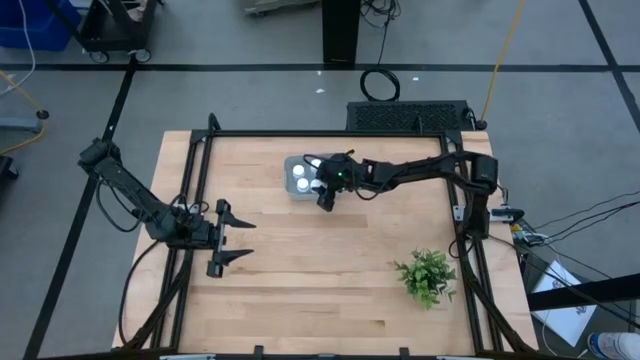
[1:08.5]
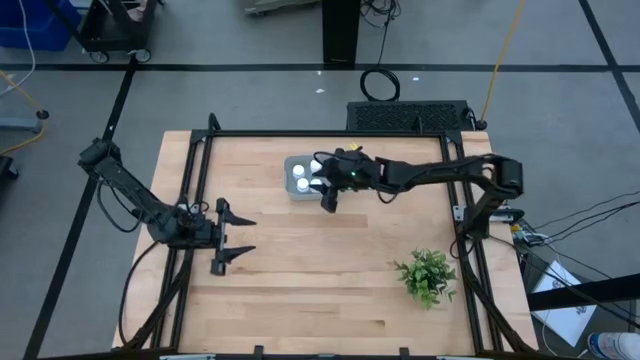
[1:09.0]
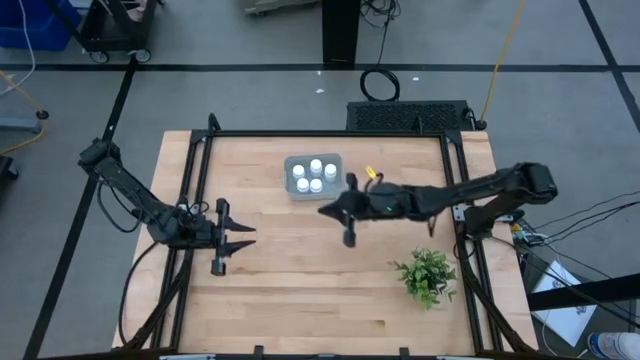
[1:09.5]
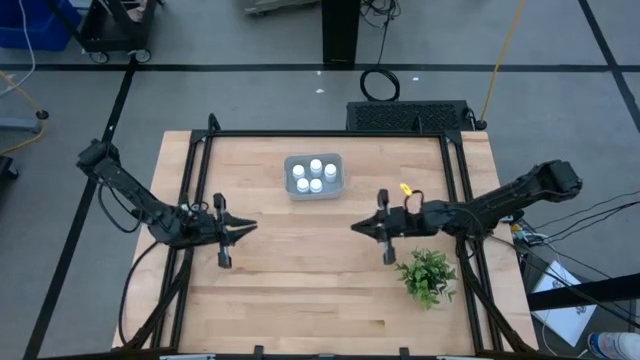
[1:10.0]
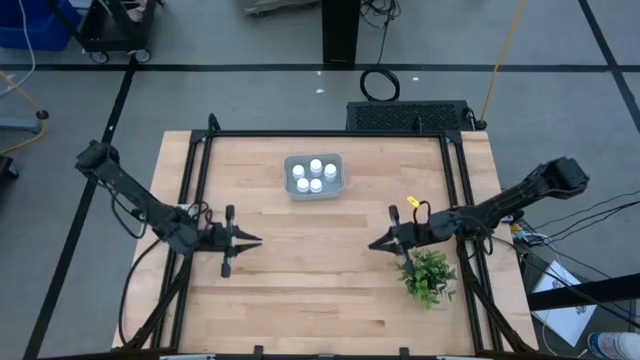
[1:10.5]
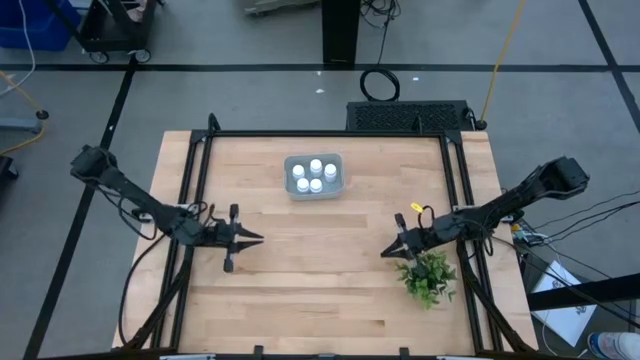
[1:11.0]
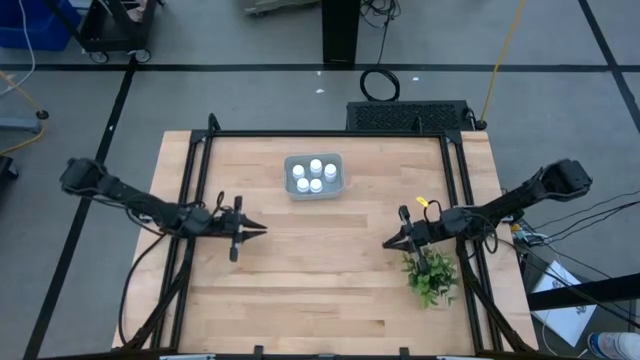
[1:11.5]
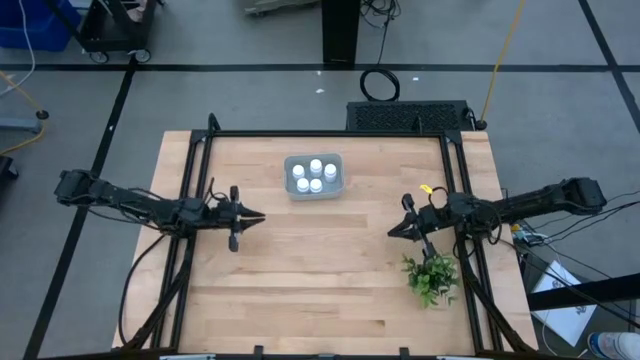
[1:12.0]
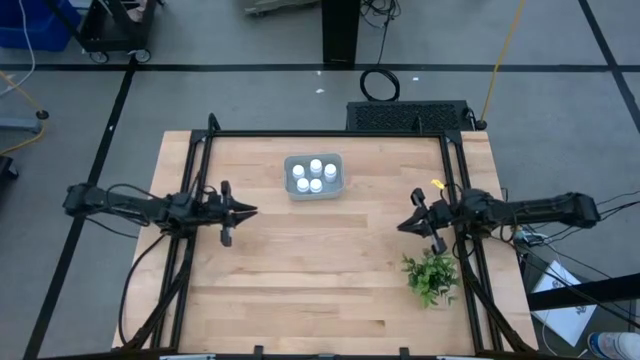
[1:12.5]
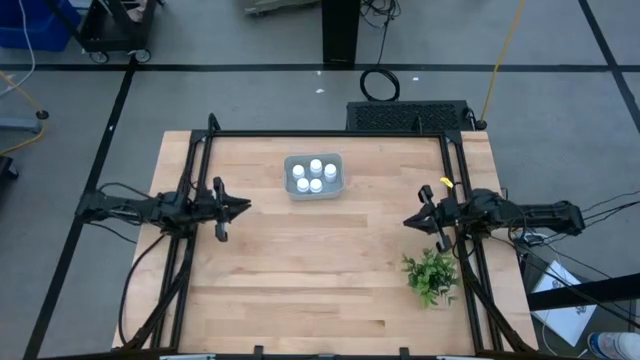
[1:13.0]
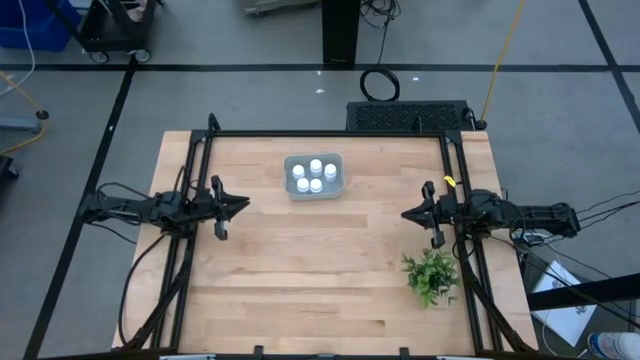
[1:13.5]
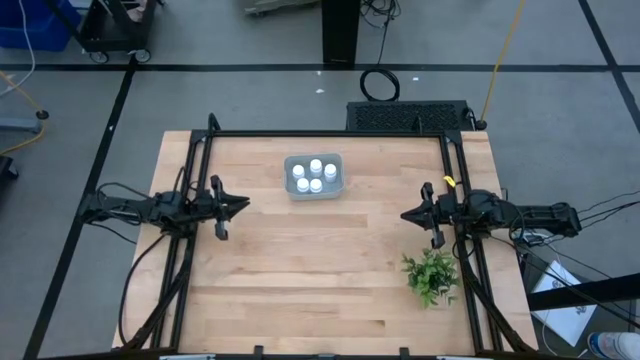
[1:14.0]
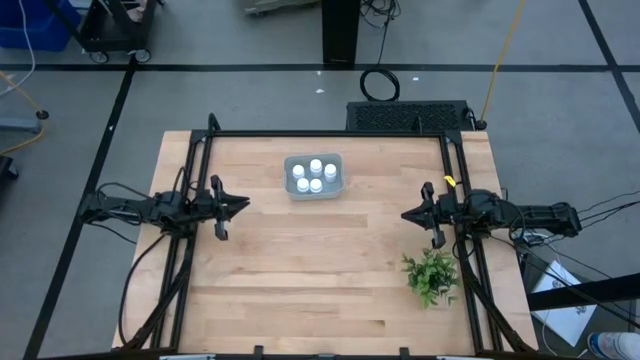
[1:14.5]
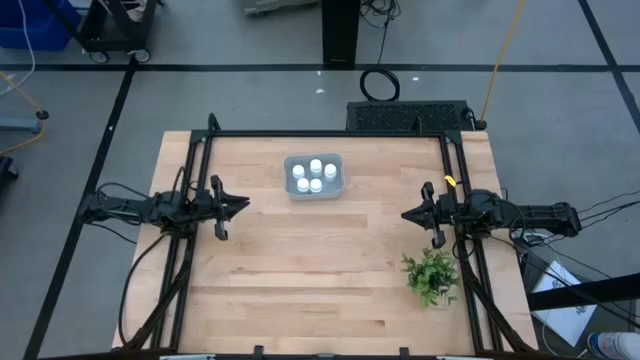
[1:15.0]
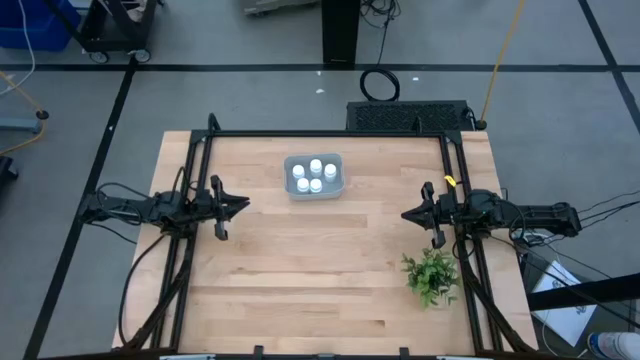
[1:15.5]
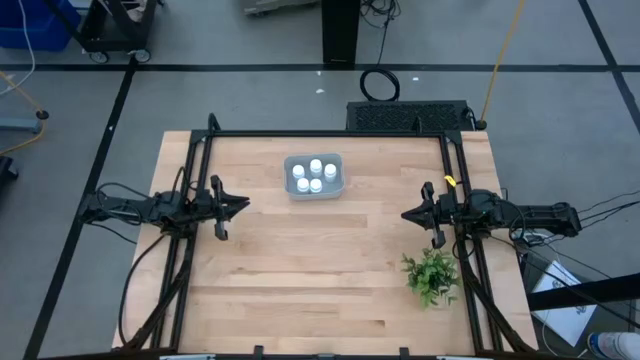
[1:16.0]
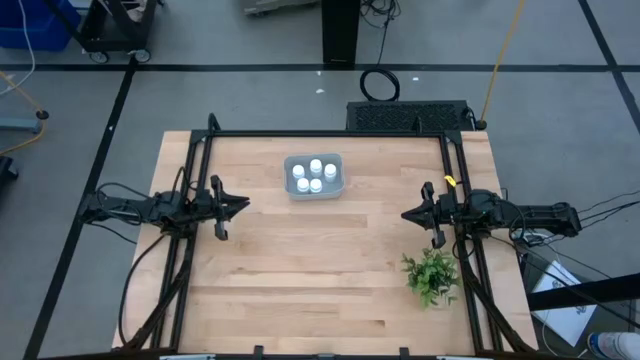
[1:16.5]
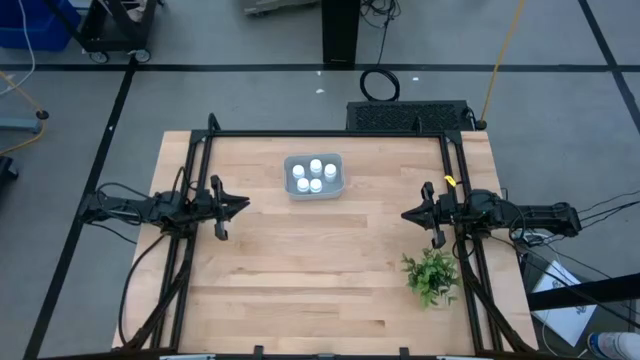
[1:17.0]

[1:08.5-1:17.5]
Task: Pick and place pill bottles into a basket
Return to Home Position

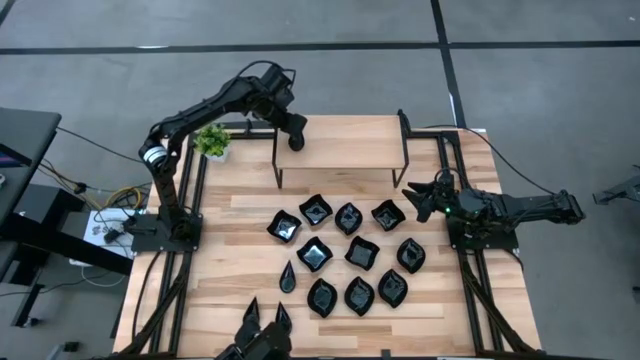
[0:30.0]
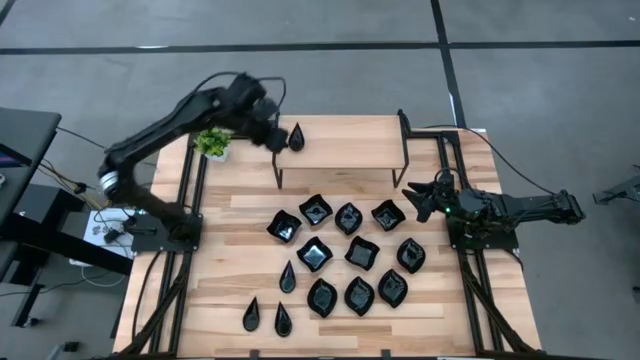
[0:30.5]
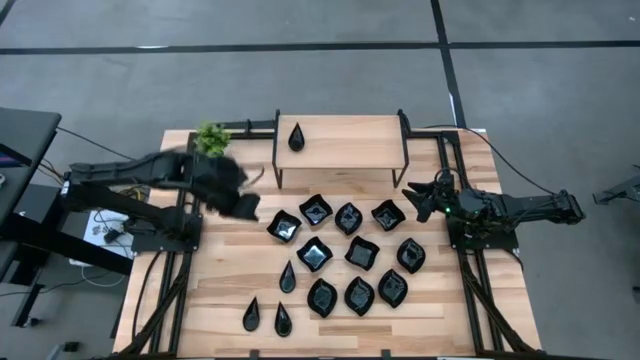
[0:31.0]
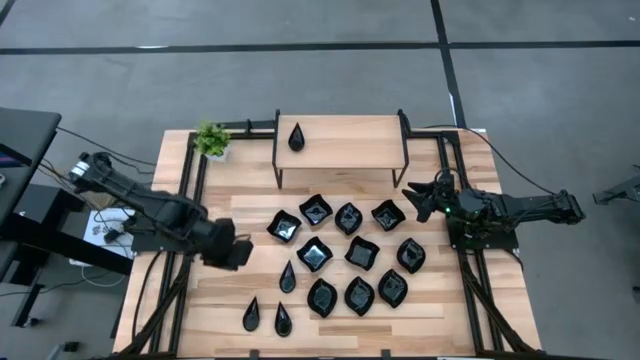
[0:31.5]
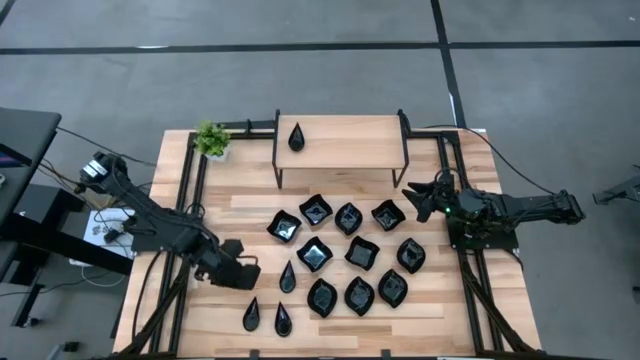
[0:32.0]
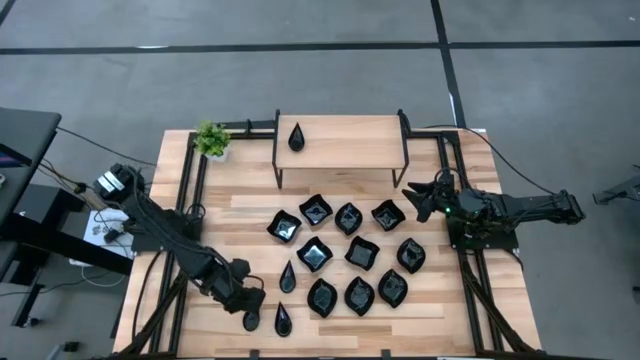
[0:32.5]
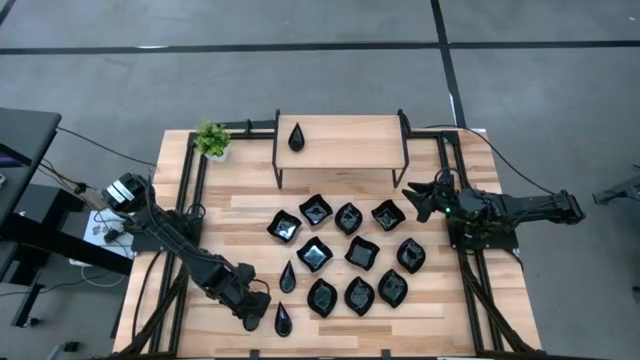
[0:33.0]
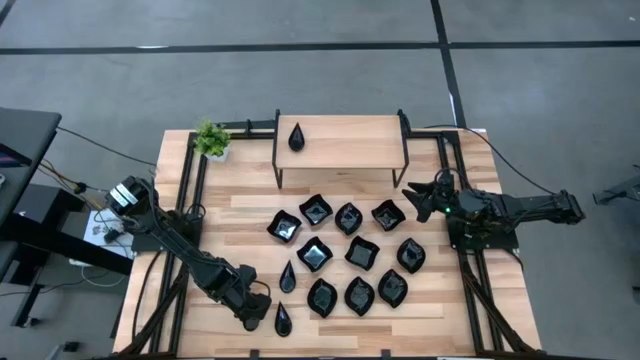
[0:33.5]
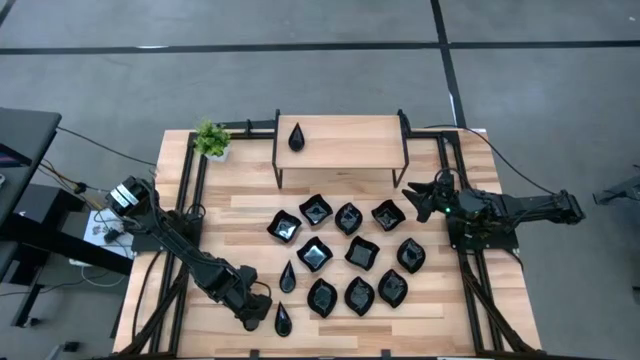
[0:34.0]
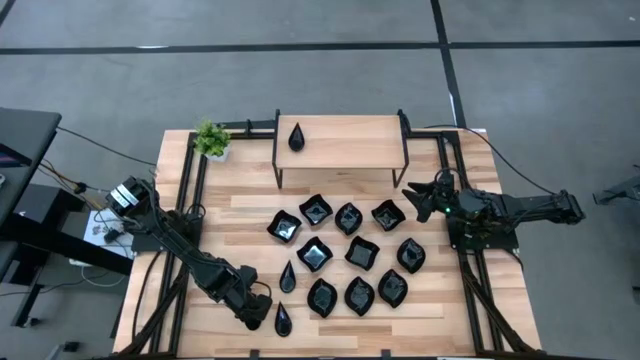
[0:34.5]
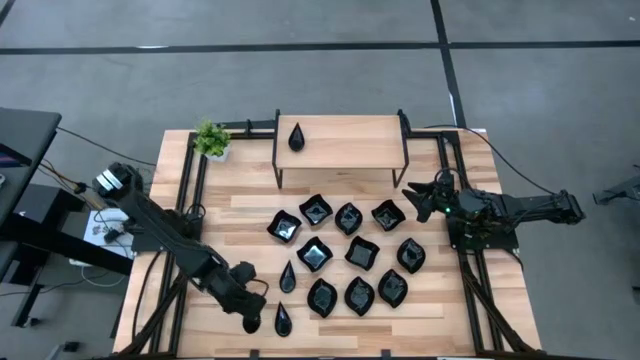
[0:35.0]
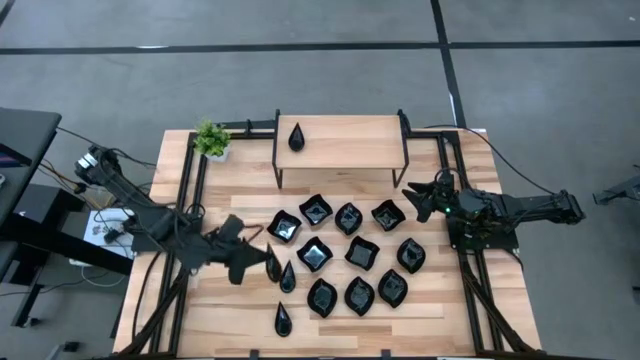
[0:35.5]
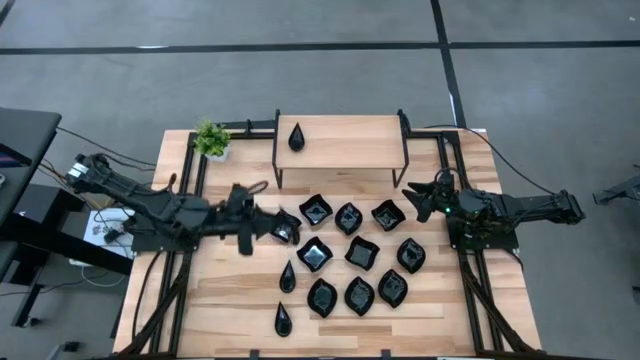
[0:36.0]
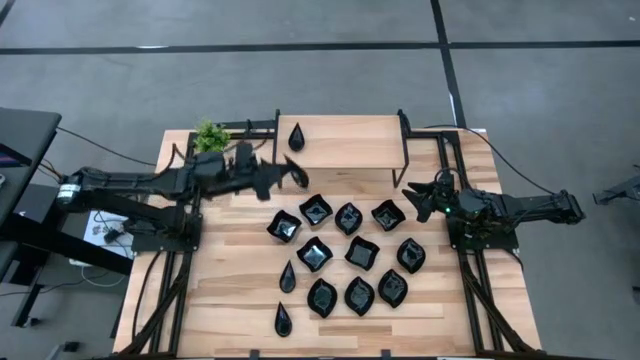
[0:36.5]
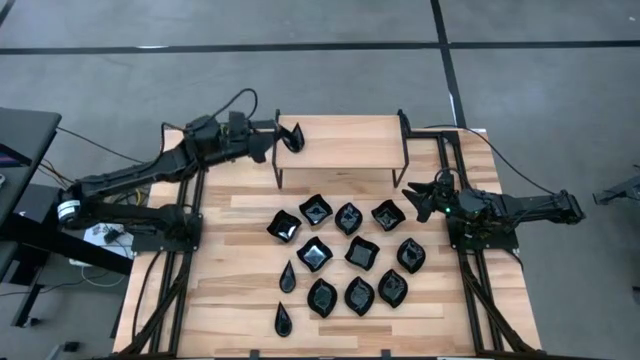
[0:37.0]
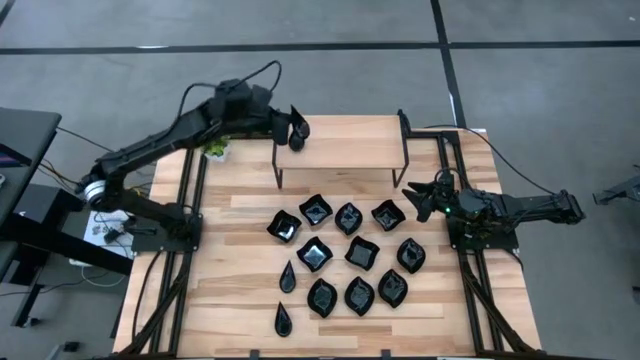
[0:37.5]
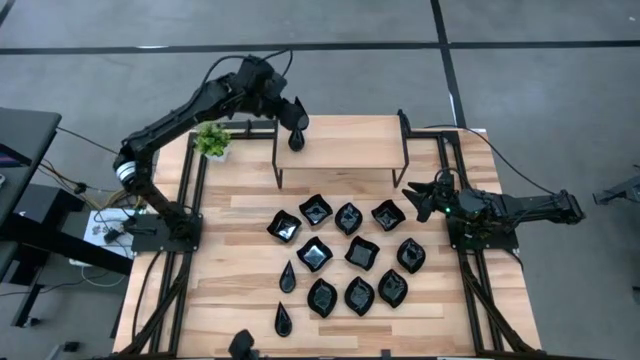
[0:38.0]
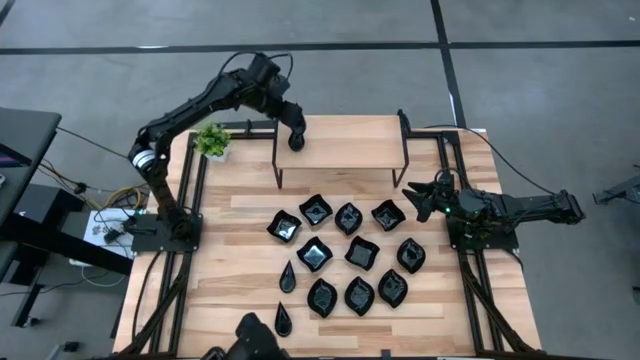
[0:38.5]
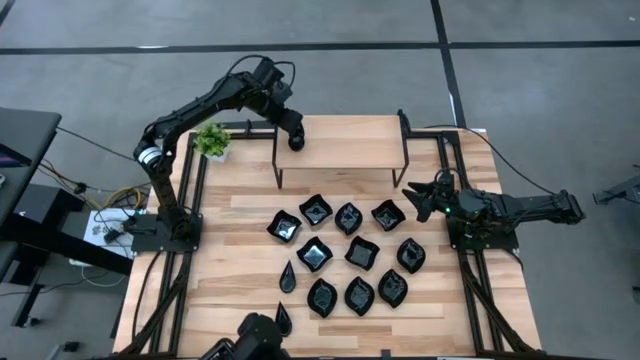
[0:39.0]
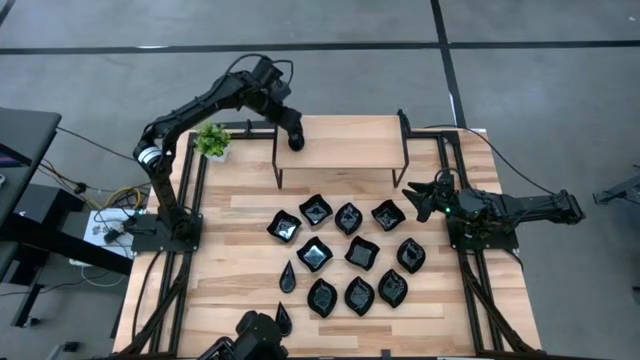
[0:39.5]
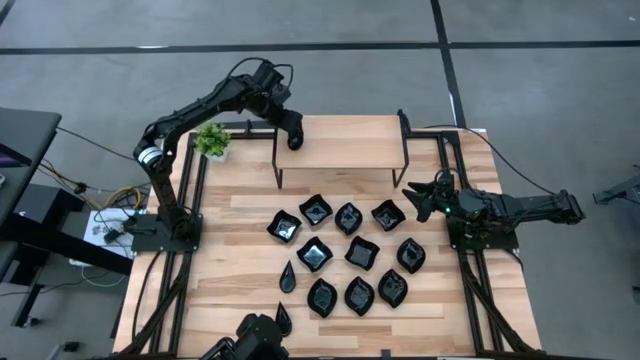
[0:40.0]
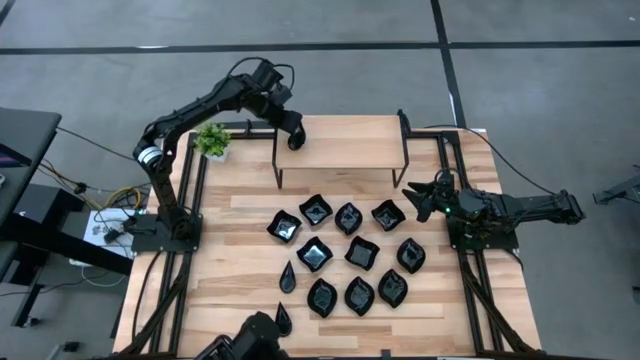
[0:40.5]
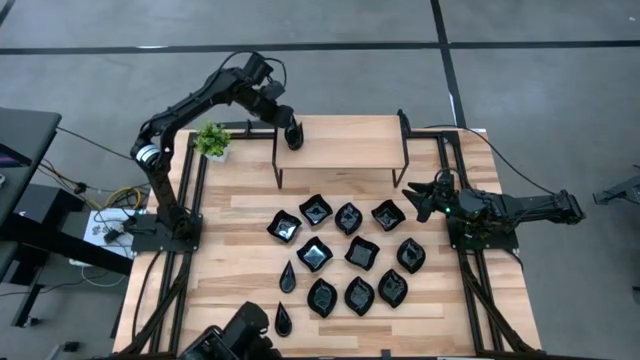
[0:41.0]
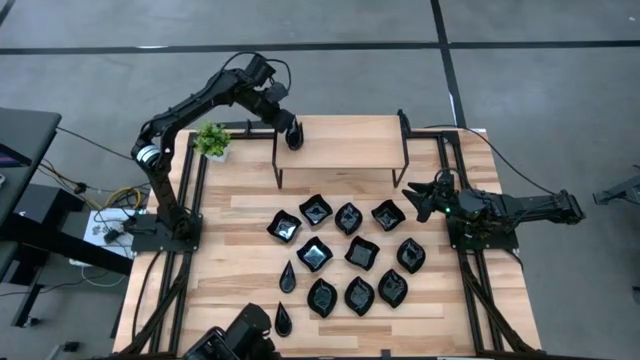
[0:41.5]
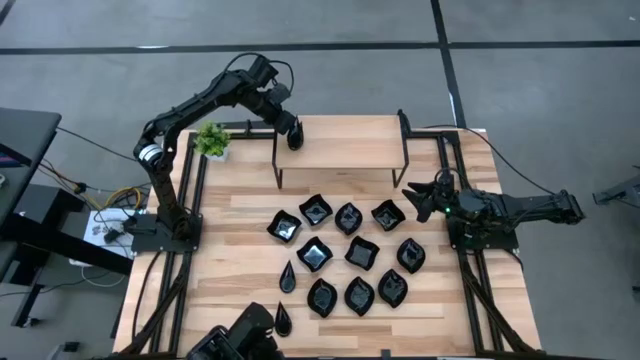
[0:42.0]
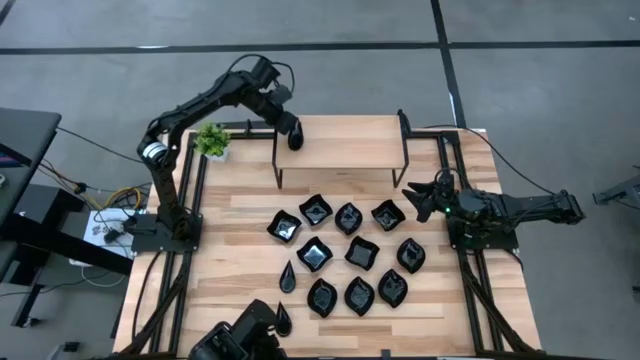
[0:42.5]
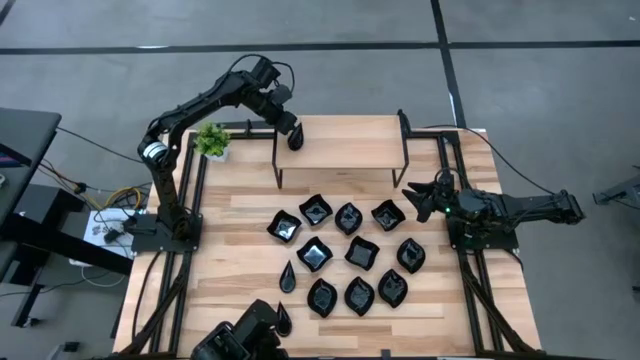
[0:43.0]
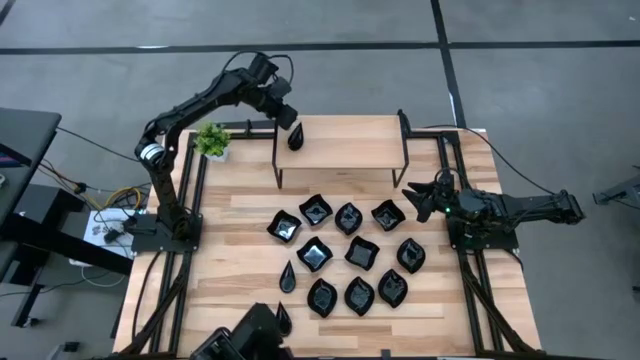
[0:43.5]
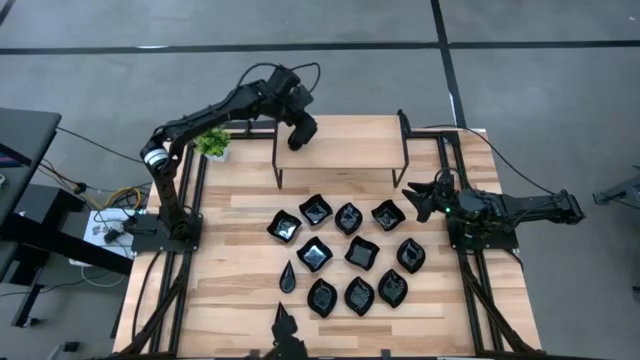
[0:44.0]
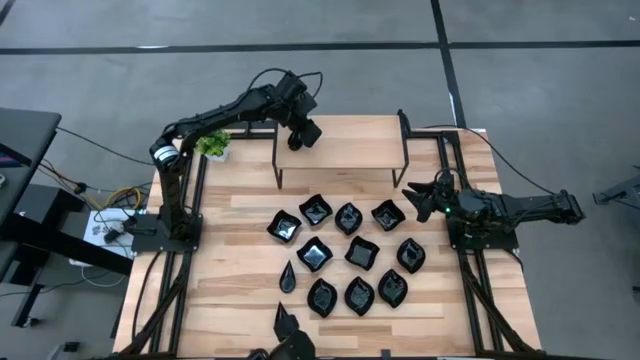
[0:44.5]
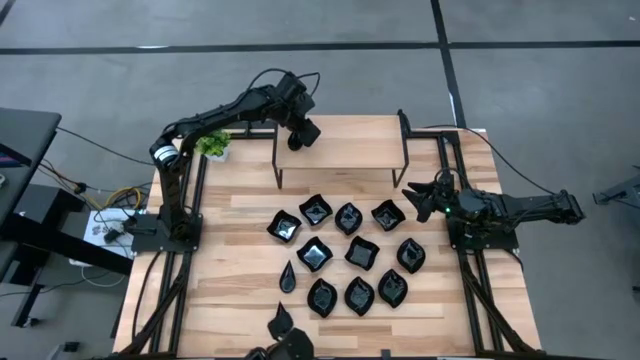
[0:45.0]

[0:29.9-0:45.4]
Task: Pick & Place Mini shaped plates
Stack the drop shaped plate on top of the drop shaped plates on the shelf
